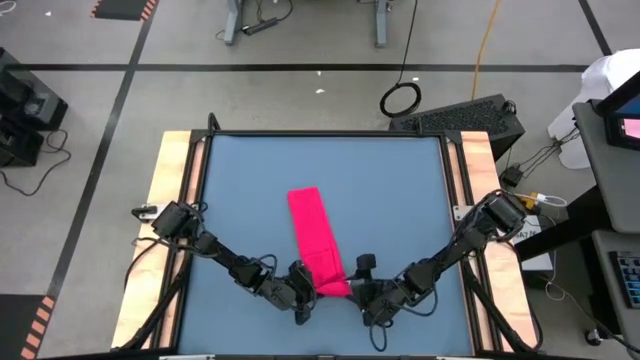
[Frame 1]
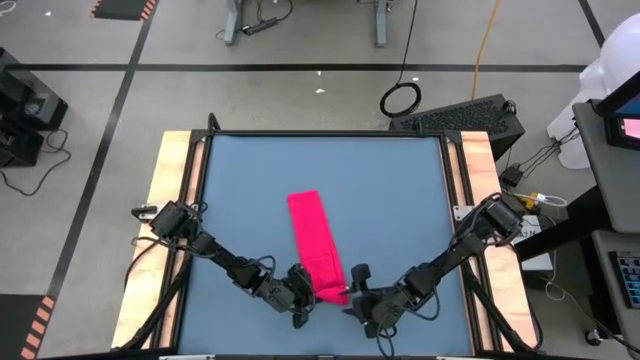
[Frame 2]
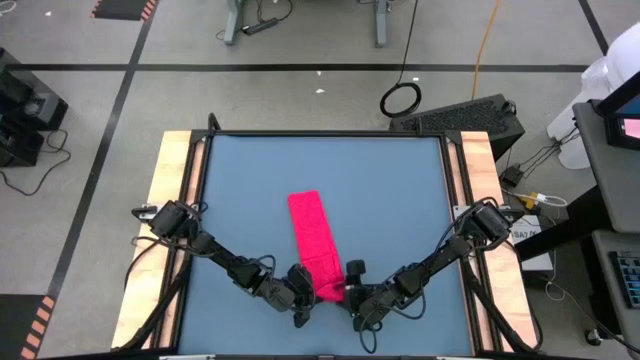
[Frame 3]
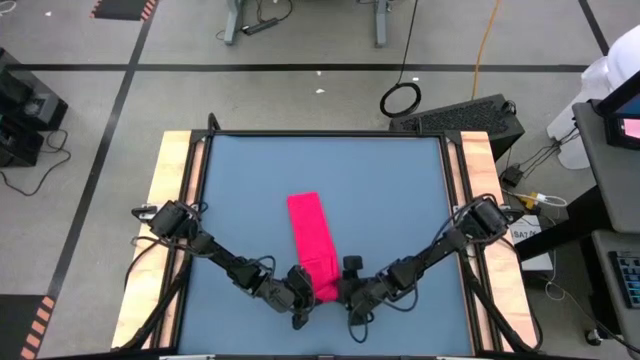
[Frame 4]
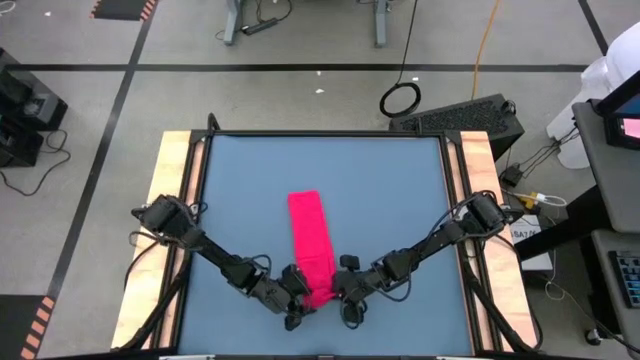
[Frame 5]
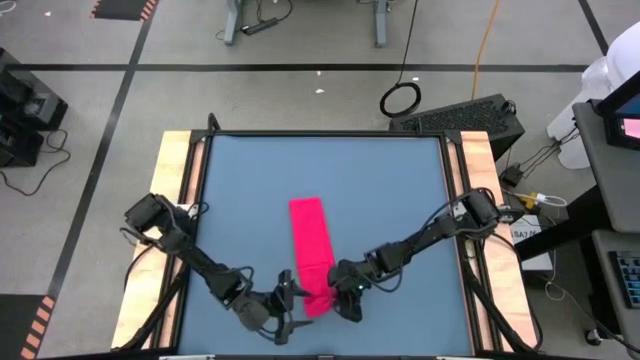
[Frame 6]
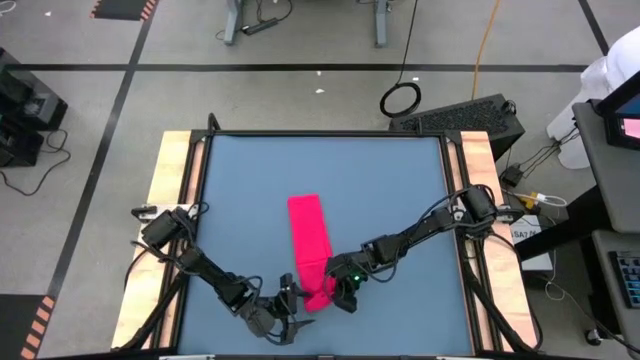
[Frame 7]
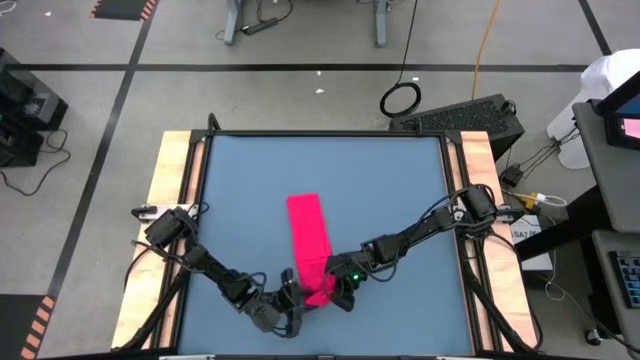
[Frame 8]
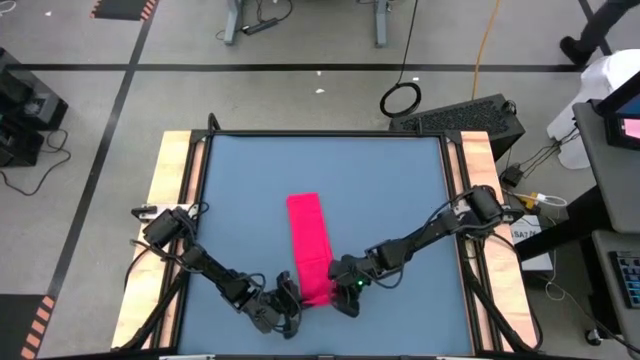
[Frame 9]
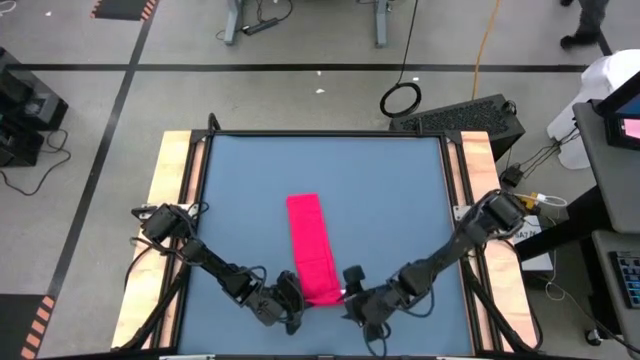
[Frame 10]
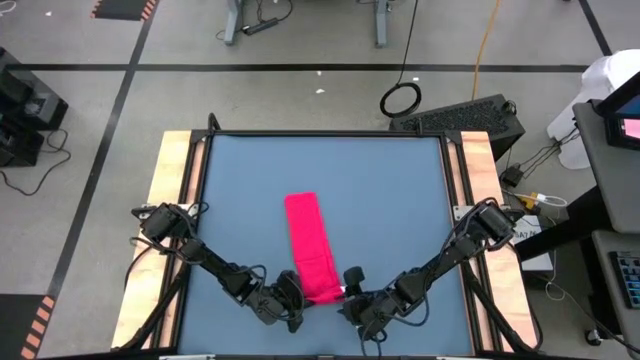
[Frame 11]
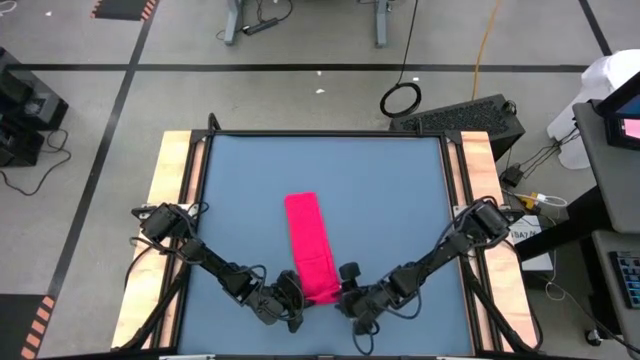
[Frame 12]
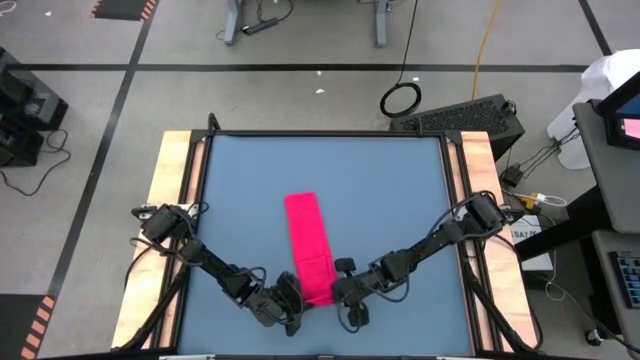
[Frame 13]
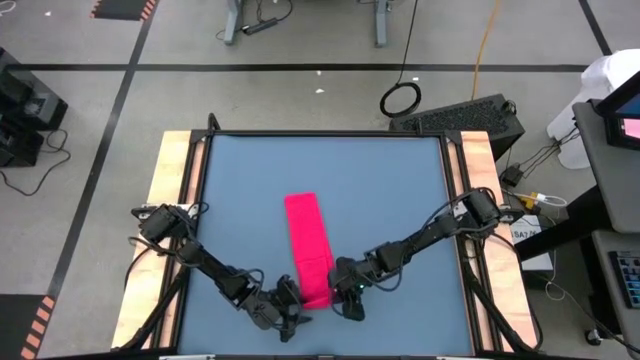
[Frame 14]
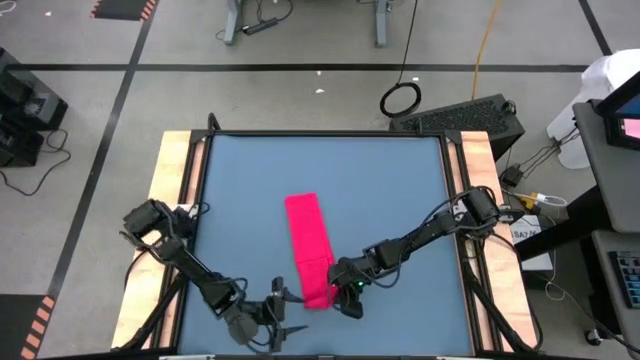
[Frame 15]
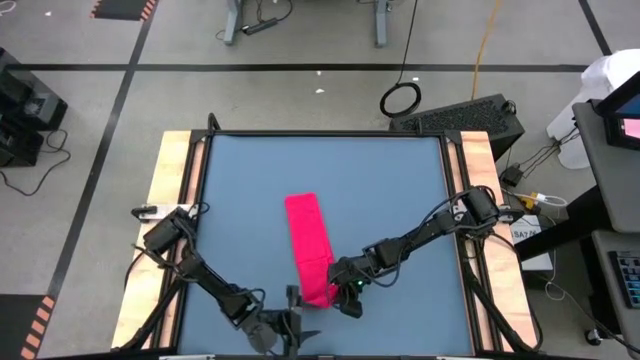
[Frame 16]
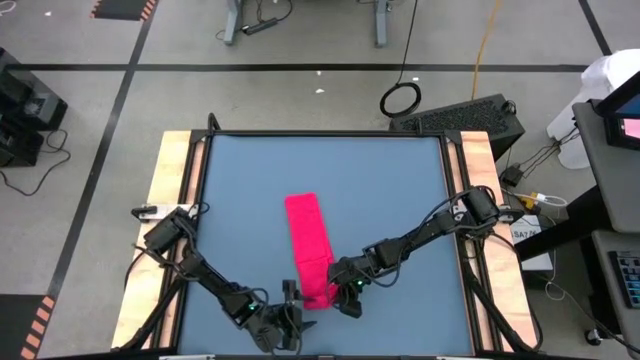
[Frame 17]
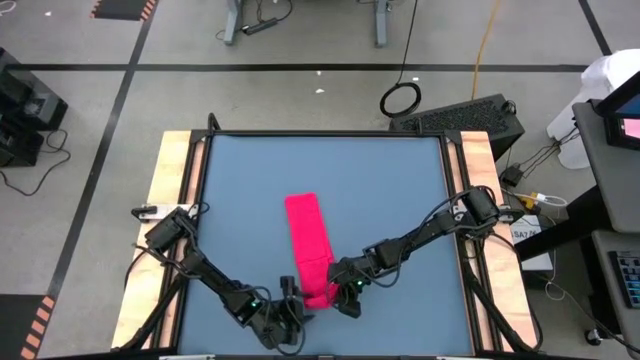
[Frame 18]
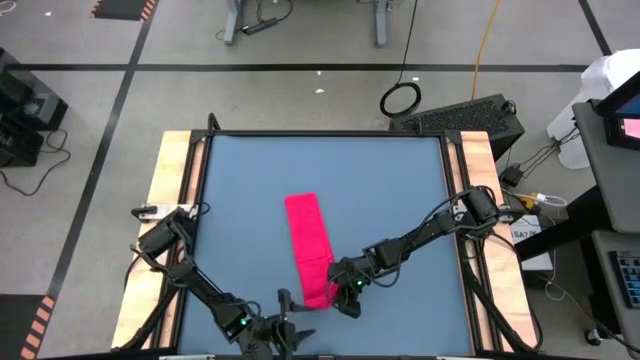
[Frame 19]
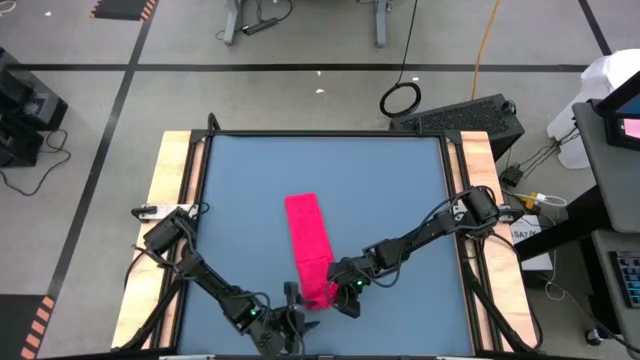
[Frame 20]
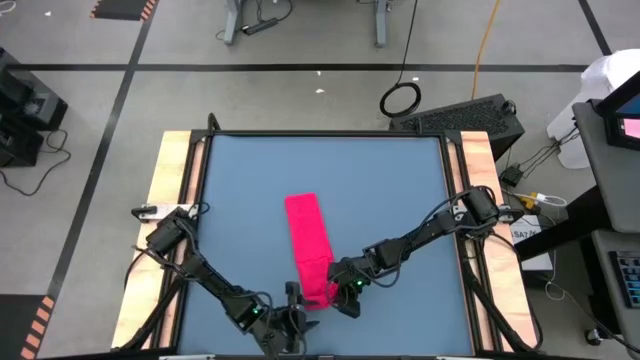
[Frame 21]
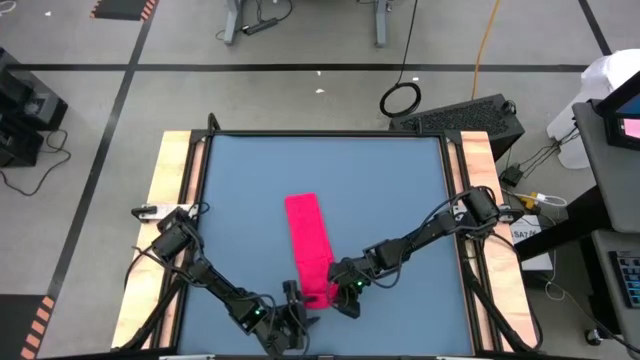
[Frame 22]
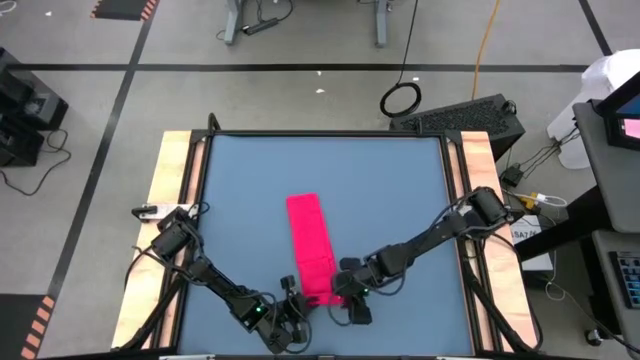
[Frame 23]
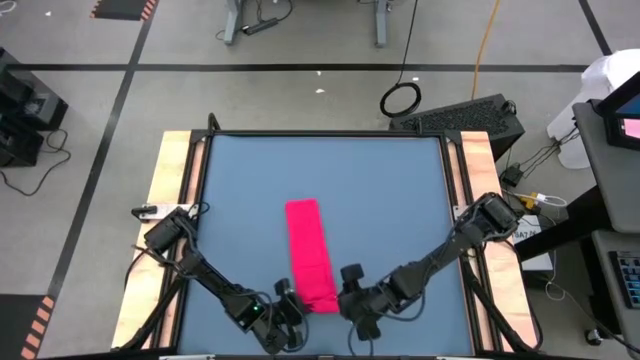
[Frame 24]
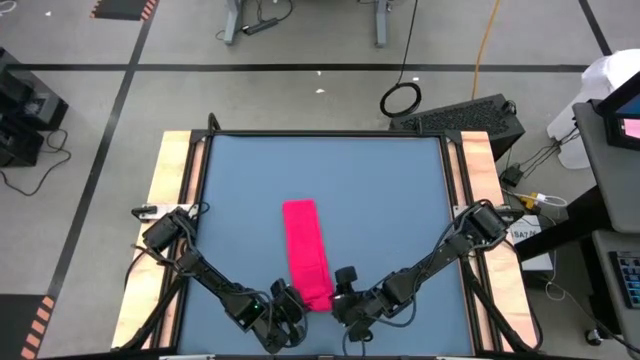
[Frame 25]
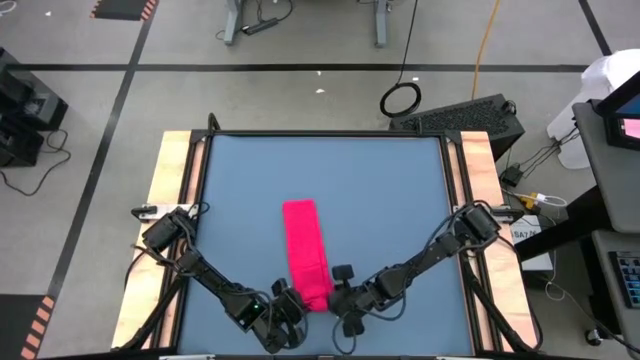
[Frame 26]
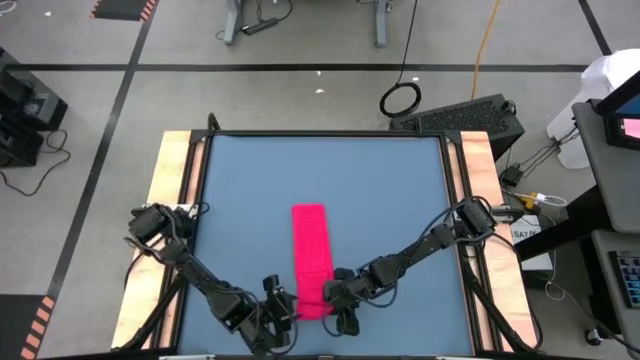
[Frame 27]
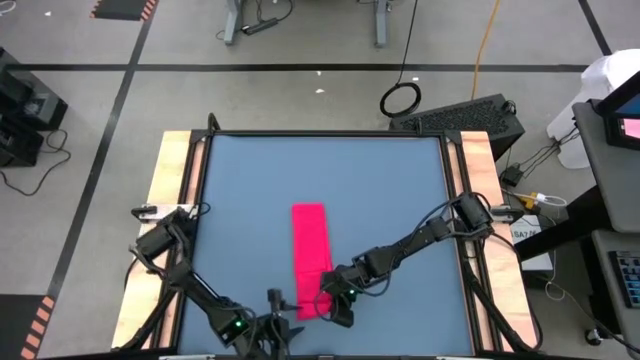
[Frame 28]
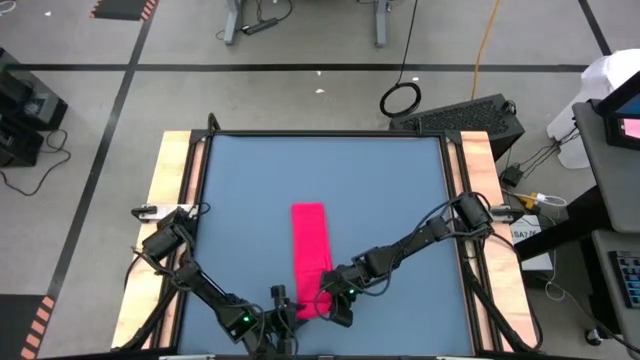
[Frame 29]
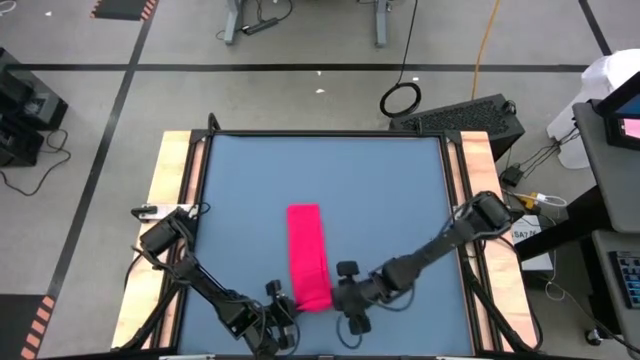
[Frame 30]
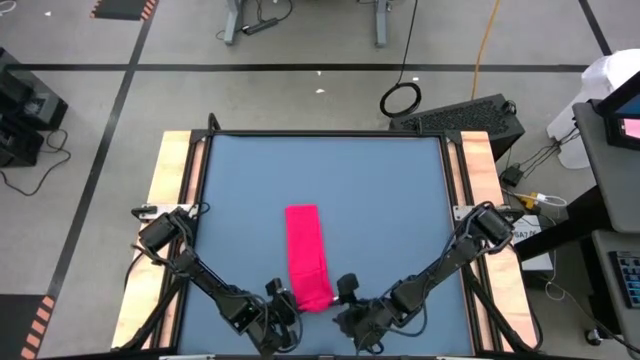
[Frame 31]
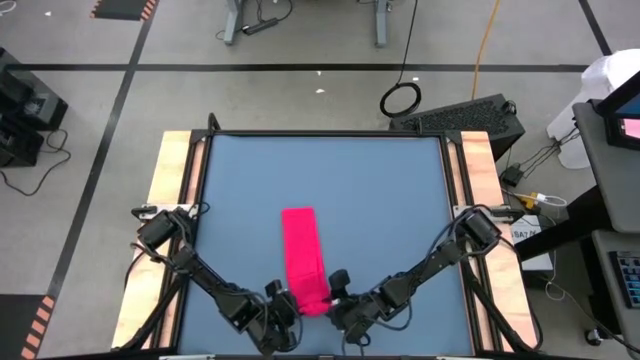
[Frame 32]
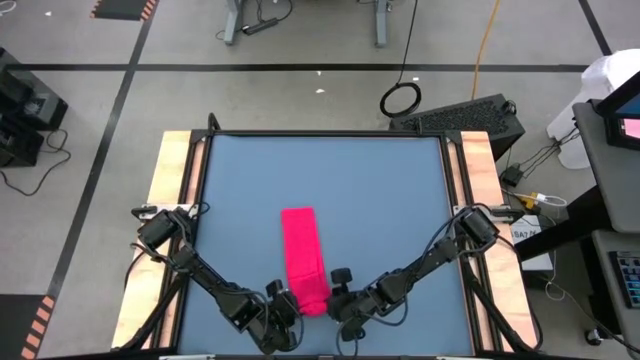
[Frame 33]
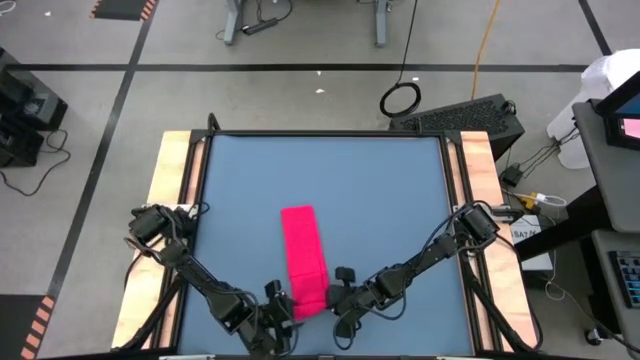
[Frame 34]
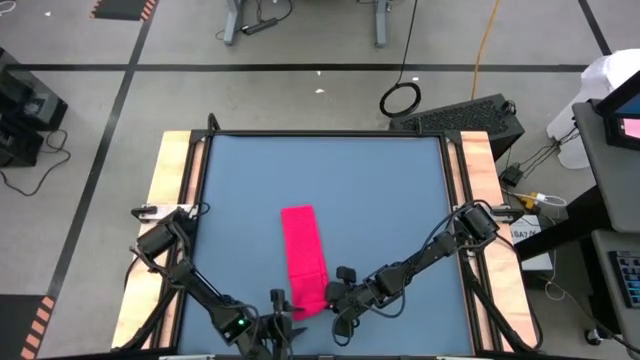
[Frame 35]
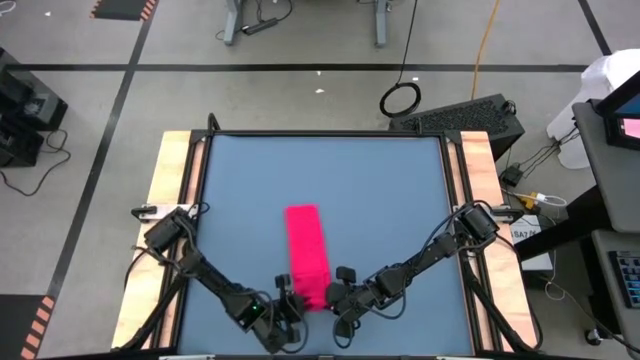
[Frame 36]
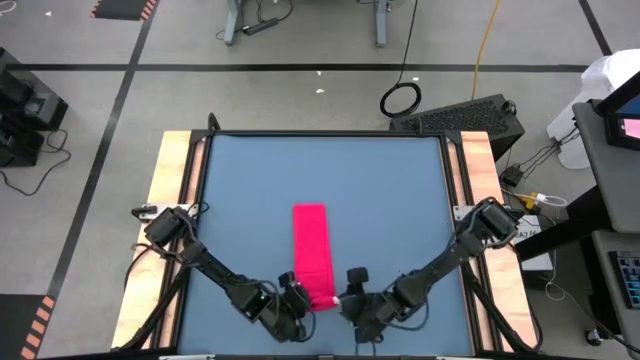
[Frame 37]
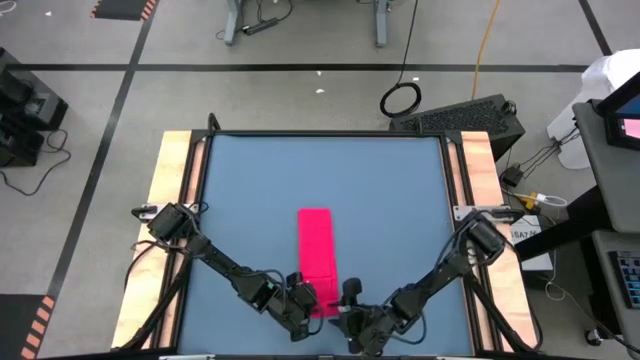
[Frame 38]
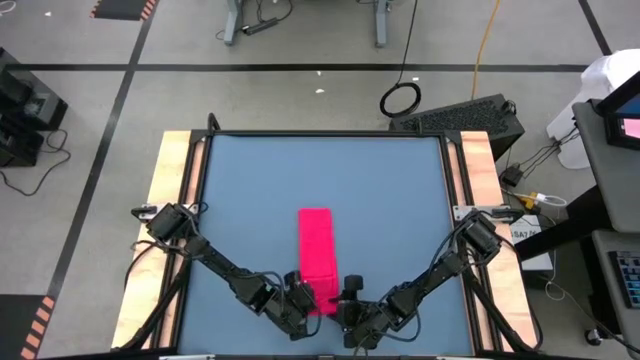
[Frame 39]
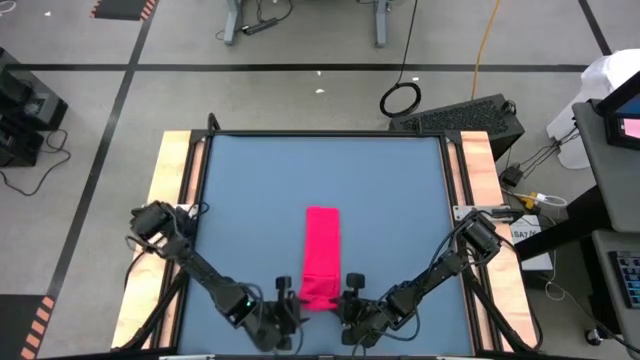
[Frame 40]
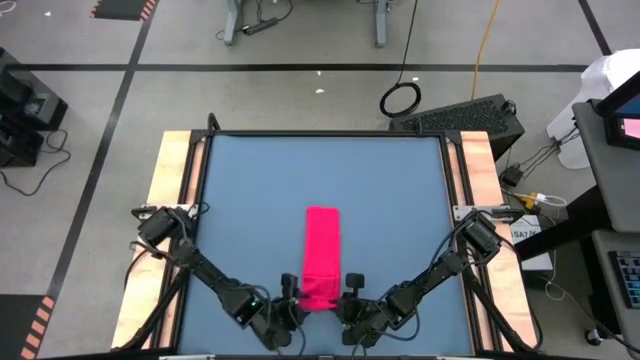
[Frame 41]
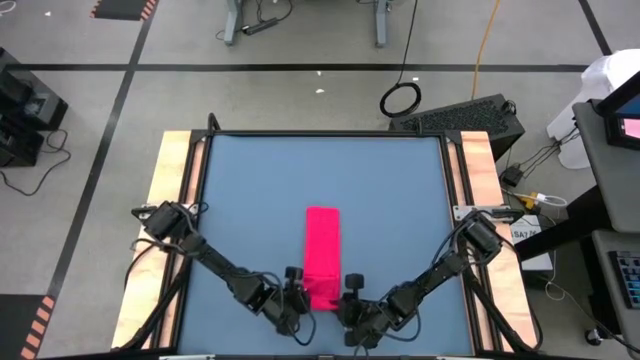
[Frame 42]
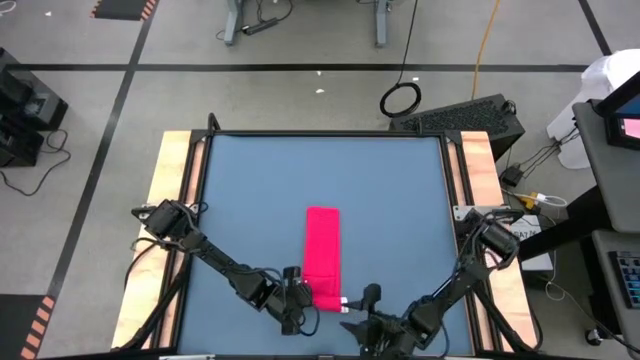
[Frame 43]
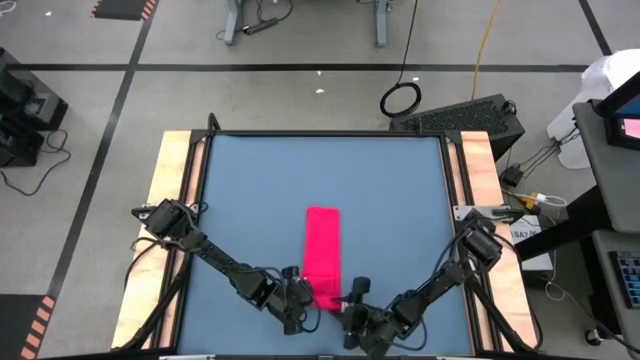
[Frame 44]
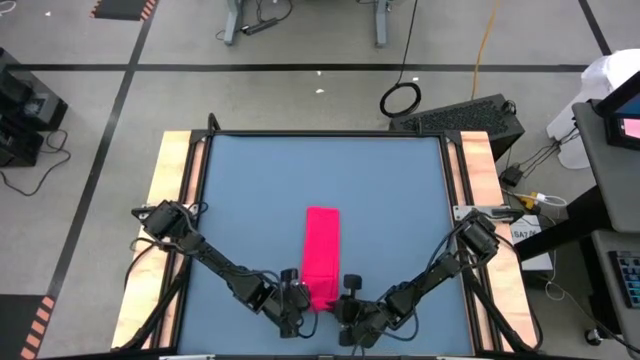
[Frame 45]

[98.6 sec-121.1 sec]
Task: Roll towel
Roll the red towel
